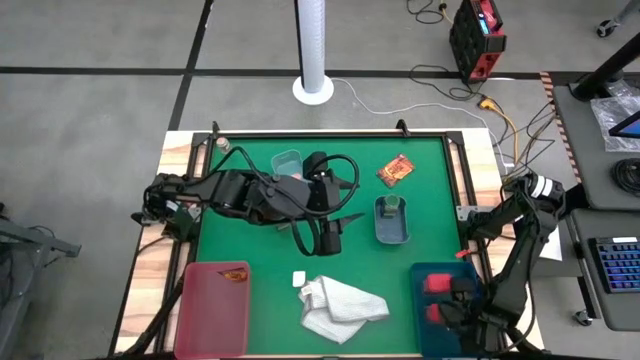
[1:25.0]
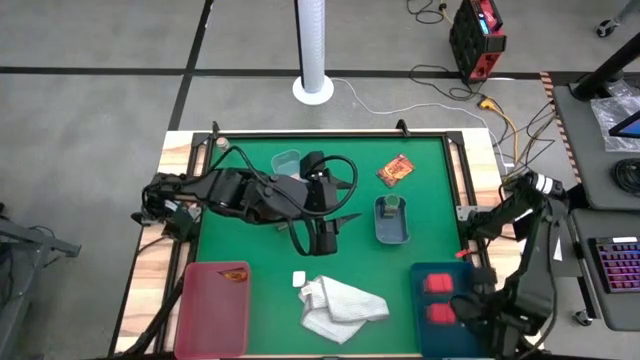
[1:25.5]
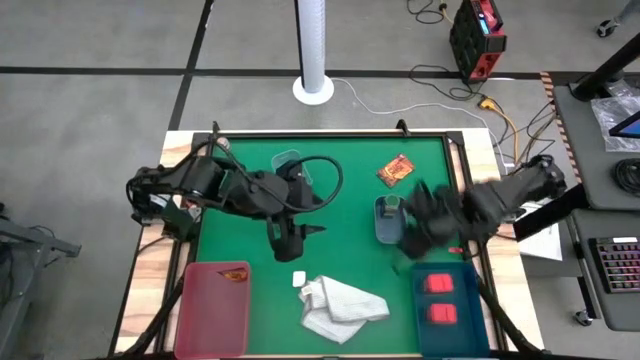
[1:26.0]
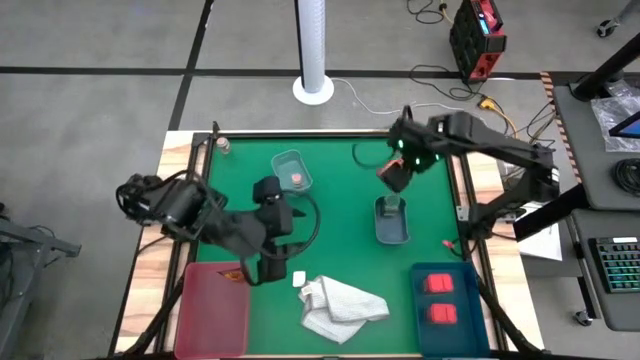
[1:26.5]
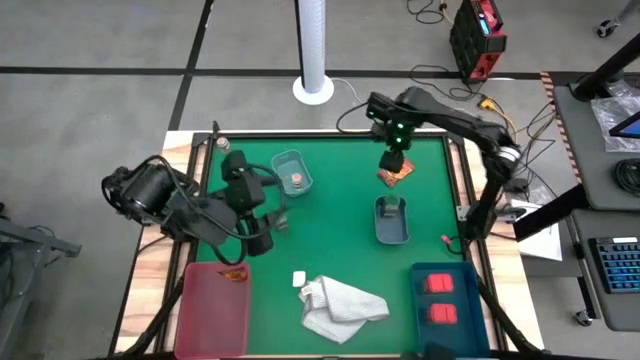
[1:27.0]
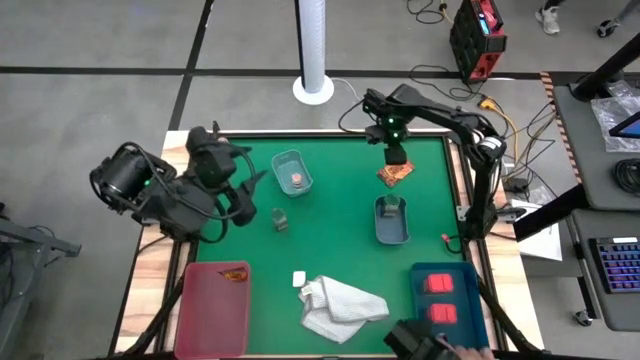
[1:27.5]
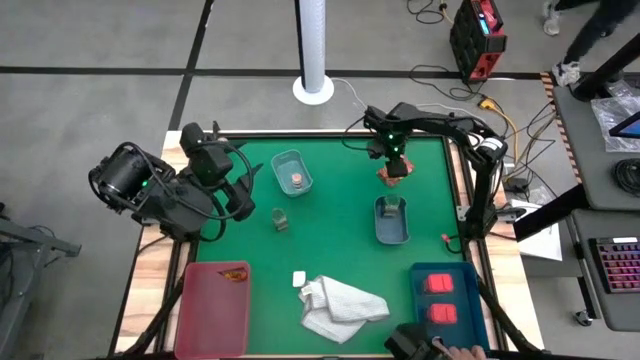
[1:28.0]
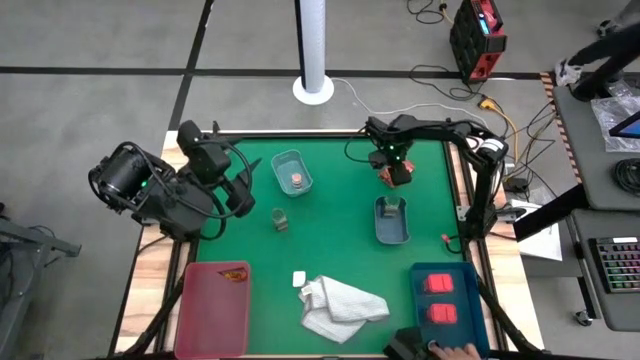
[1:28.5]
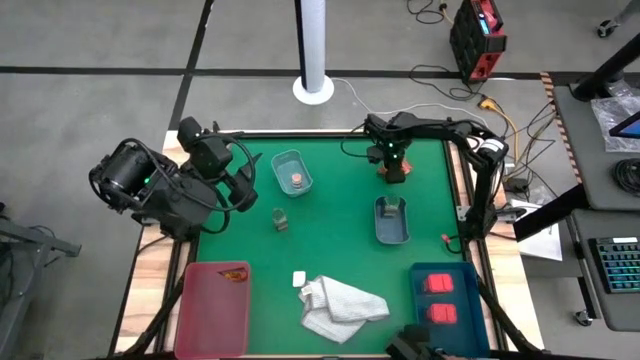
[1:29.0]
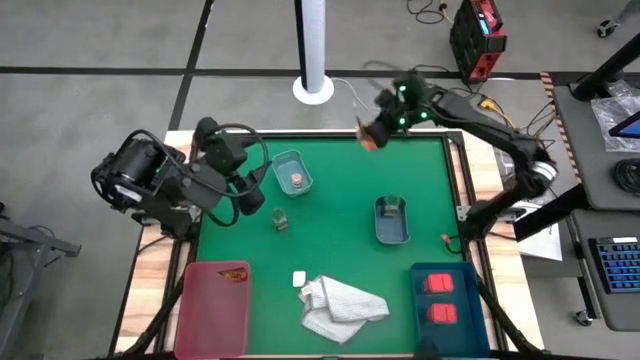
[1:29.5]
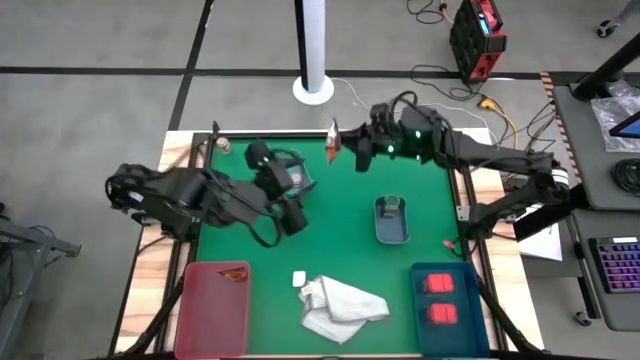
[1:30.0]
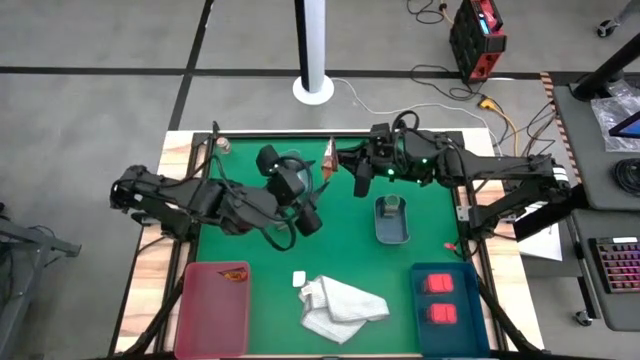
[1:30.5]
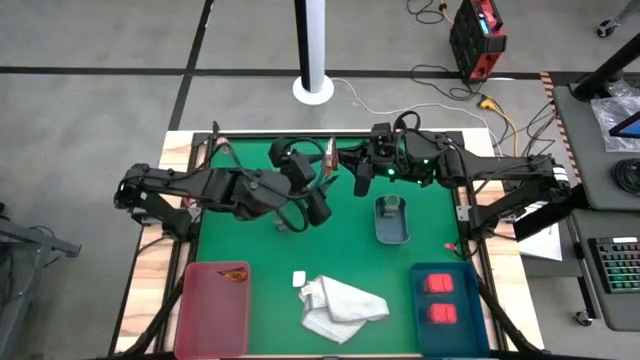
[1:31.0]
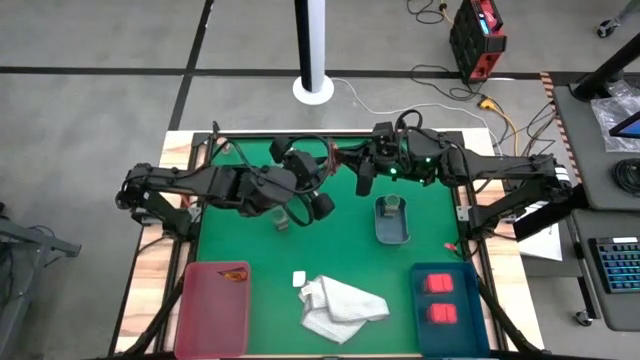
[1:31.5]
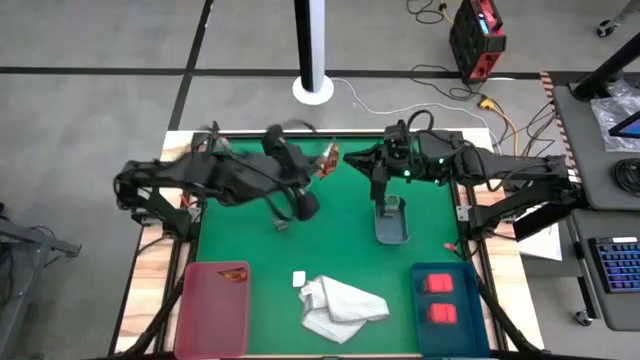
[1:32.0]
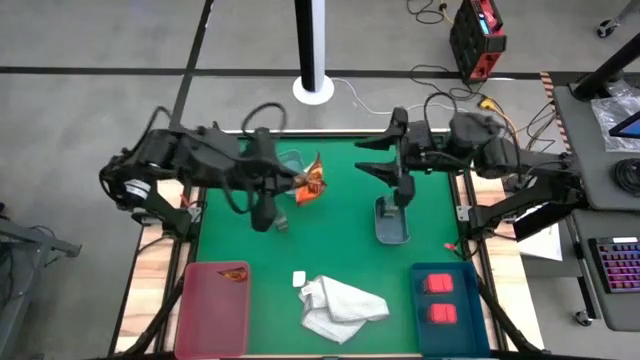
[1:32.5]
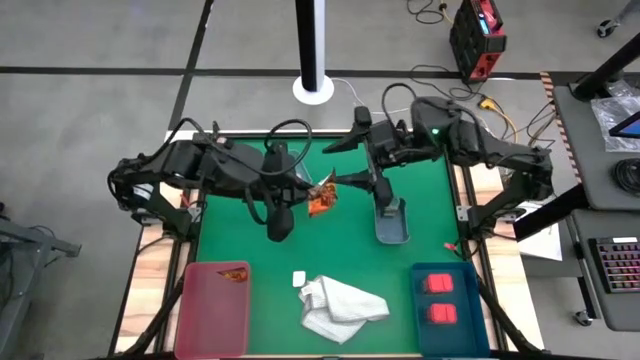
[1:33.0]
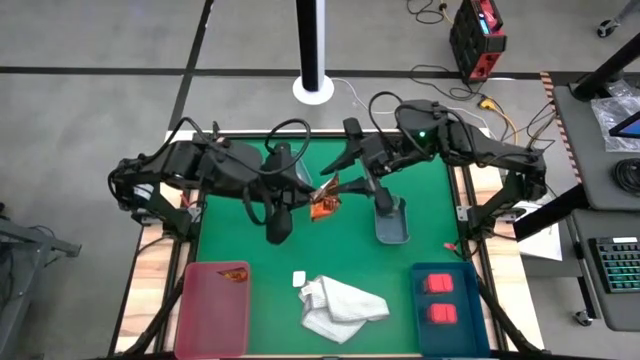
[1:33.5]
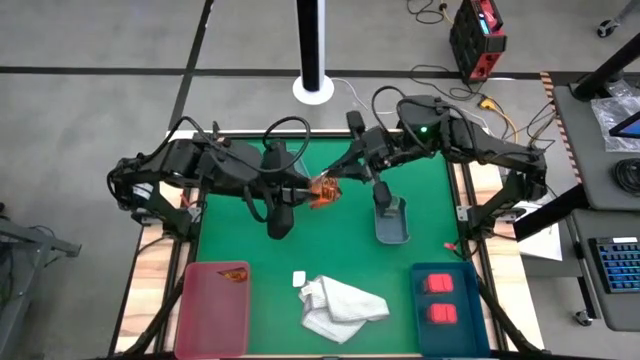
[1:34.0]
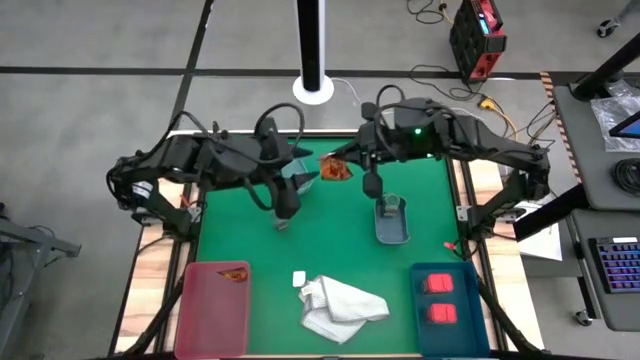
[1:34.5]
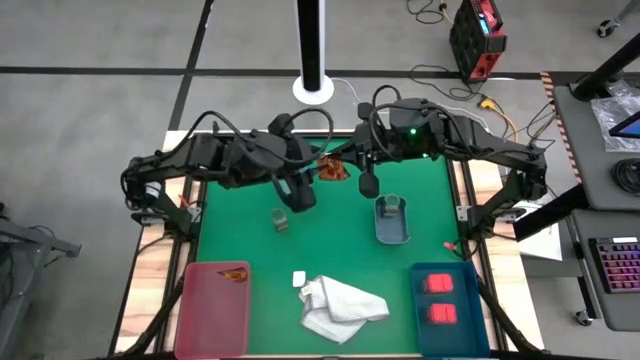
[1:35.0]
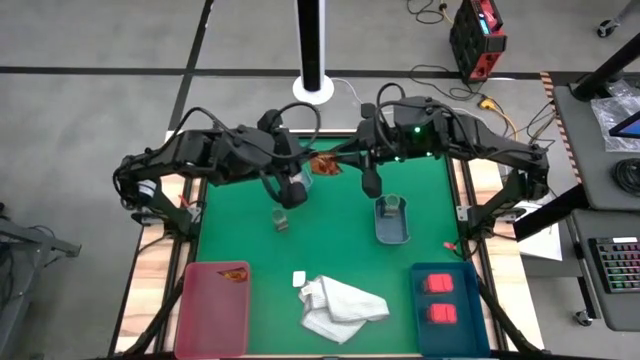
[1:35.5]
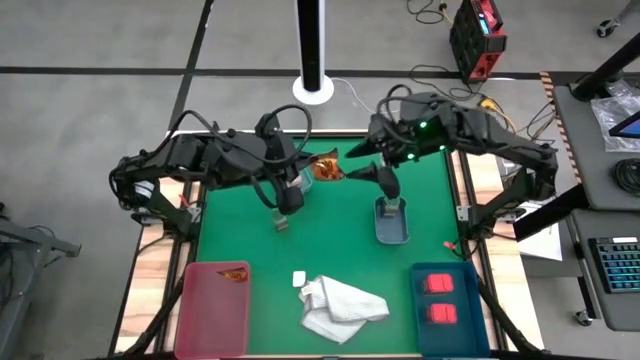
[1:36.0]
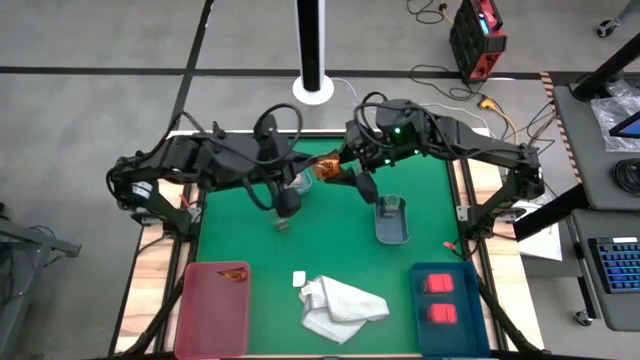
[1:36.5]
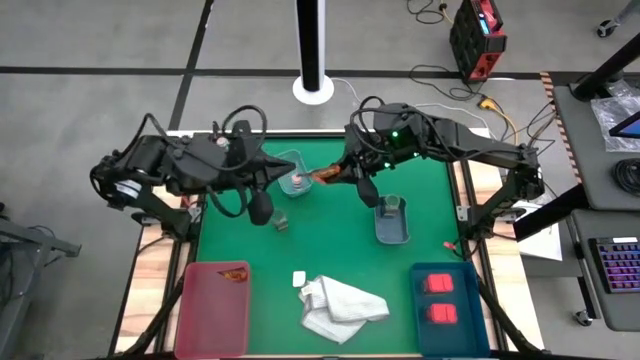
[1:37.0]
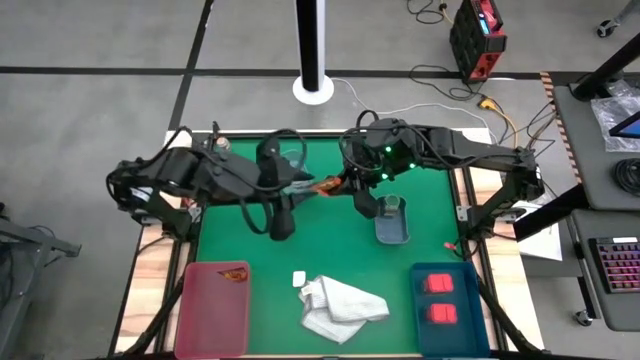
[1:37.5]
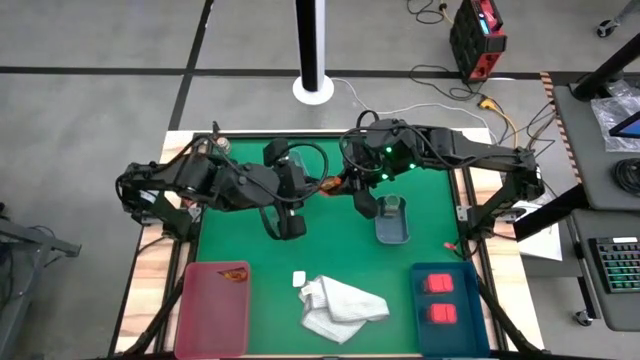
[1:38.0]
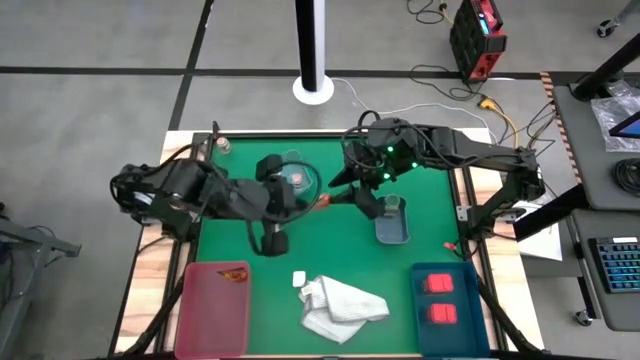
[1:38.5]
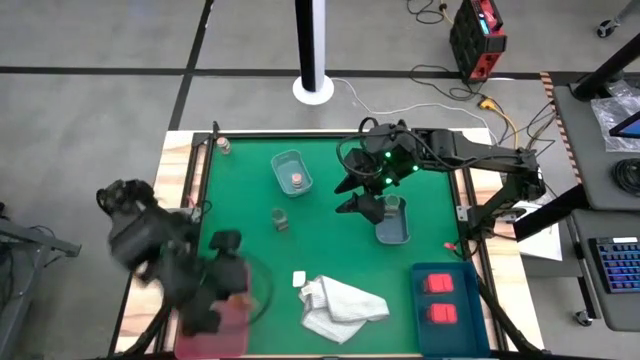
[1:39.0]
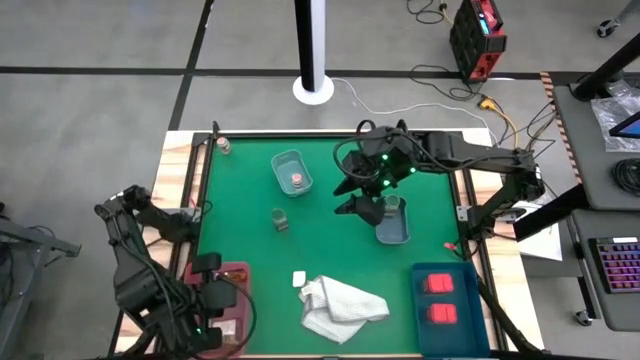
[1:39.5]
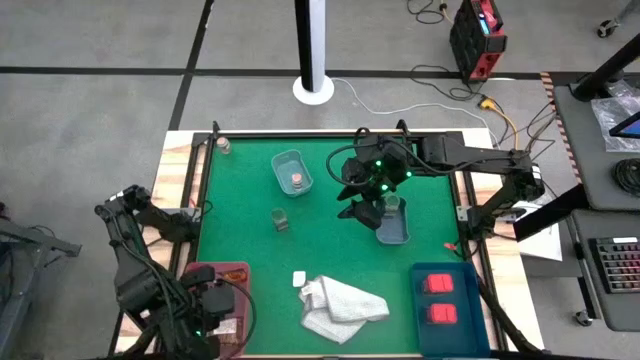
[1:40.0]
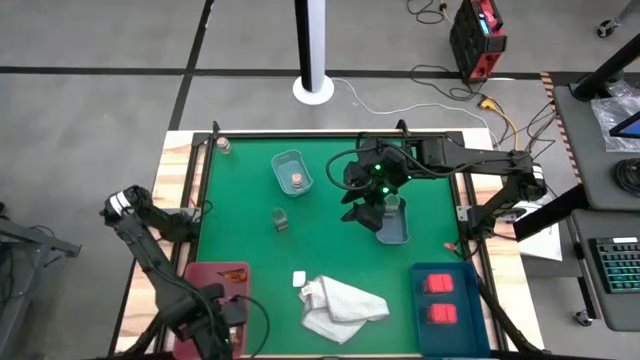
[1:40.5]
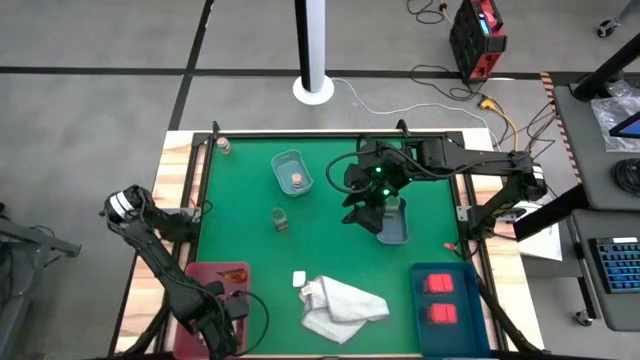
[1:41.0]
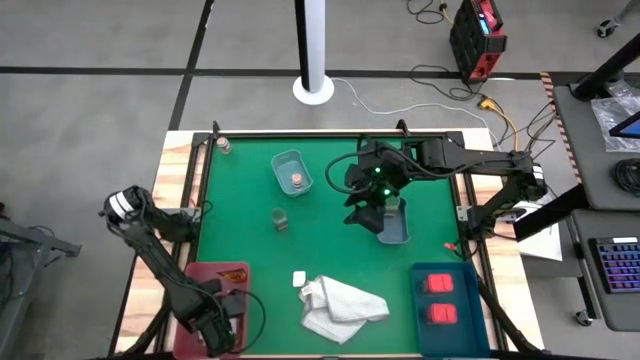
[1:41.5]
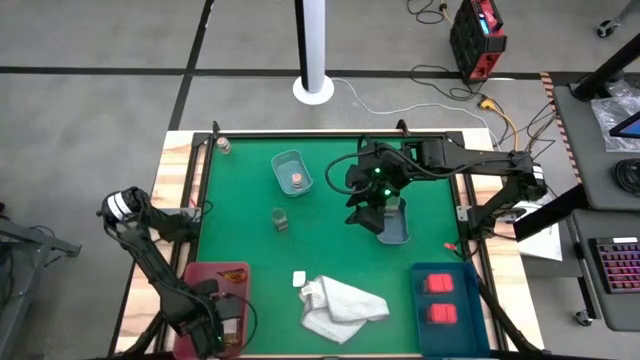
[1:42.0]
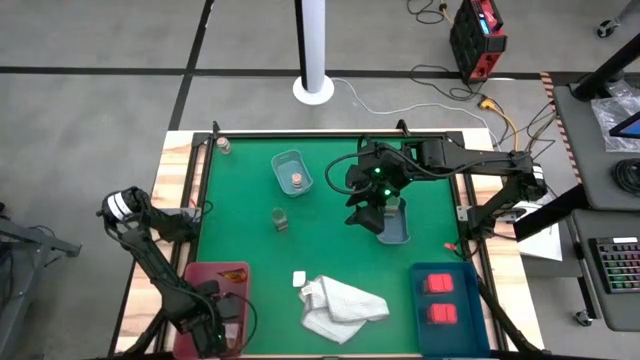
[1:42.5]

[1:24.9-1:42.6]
Task: Sort spices by type
Put the orange spice pack into the pink bin

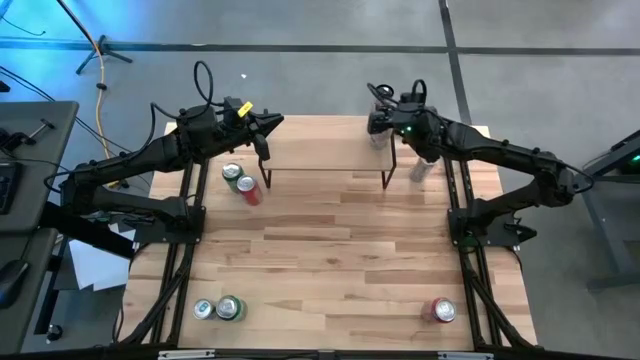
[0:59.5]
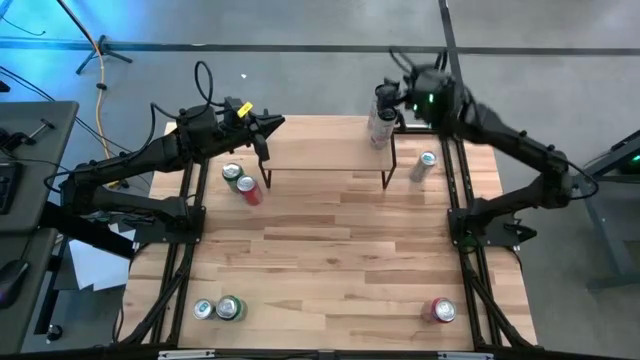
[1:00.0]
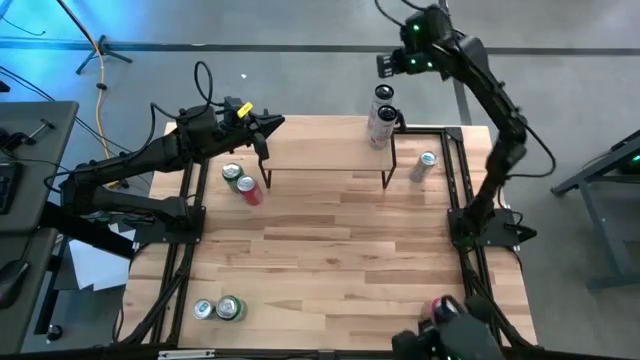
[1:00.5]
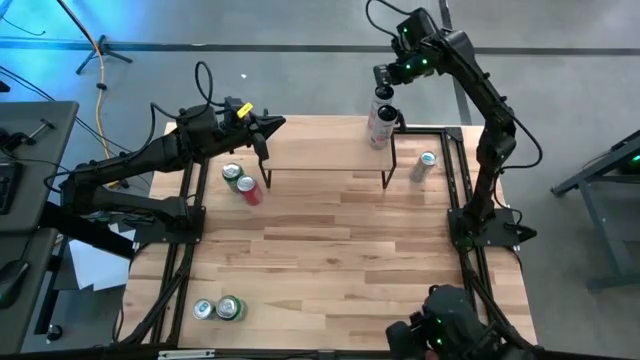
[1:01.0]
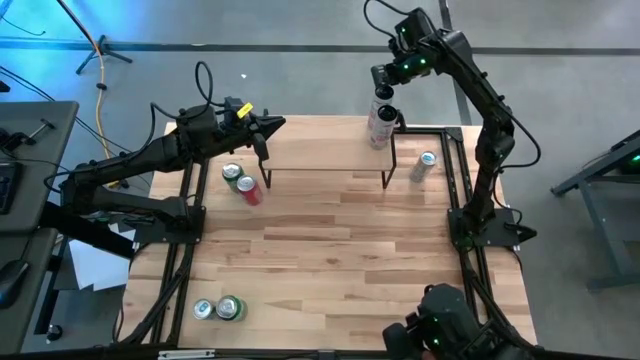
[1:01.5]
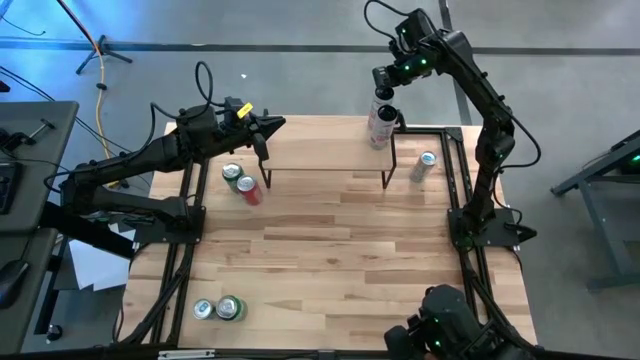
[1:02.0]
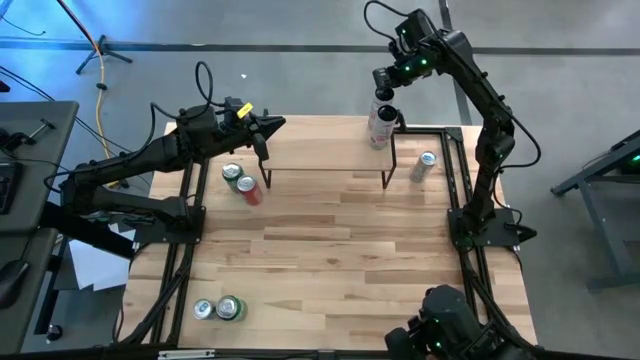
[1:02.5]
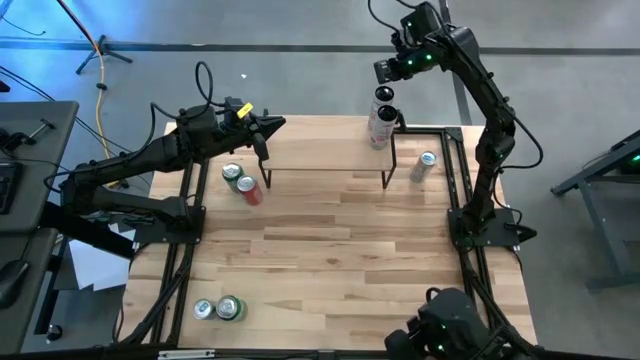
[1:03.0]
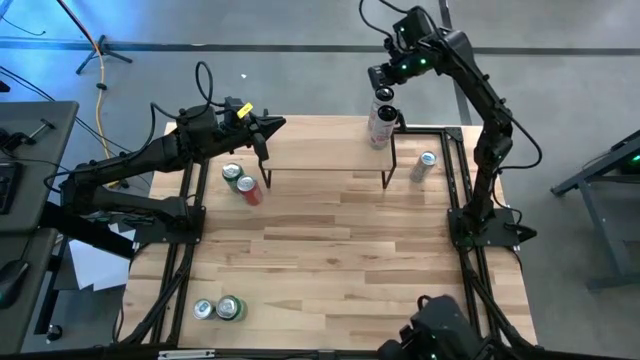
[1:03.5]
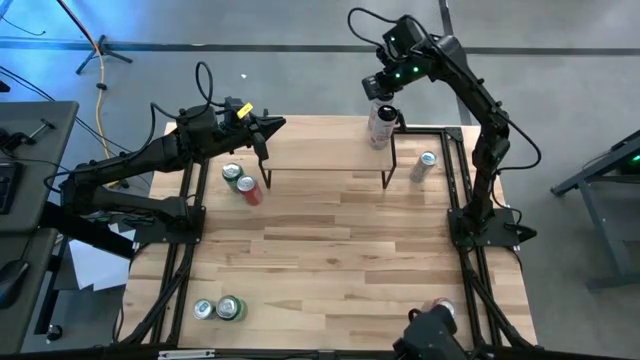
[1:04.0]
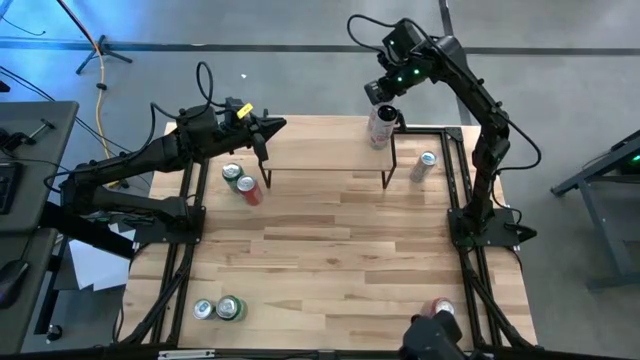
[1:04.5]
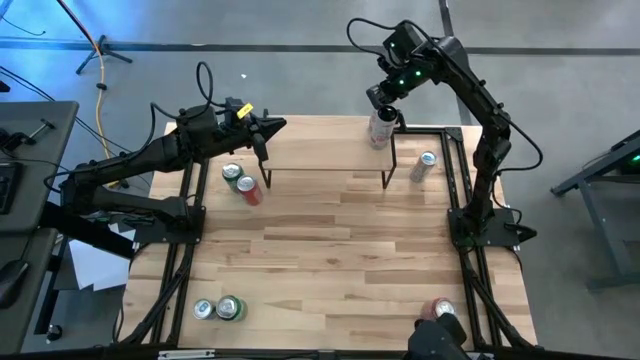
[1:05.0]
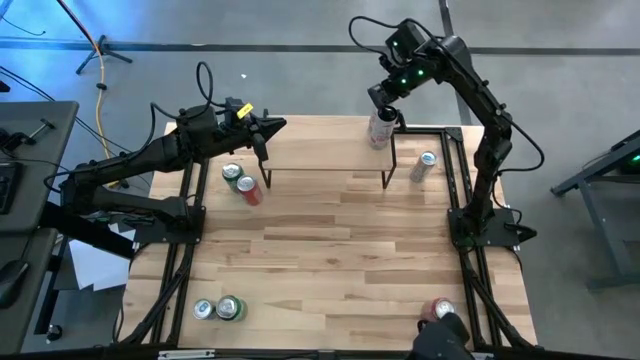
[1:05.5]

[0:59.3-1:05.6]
Task: Place canned beverage on shelf
Adjust the white pink soda can on the shelf
